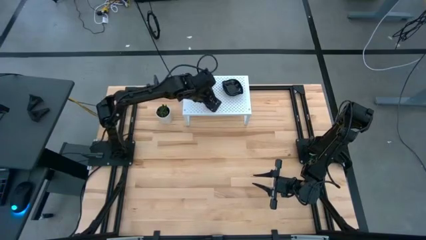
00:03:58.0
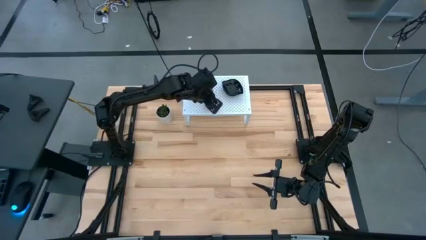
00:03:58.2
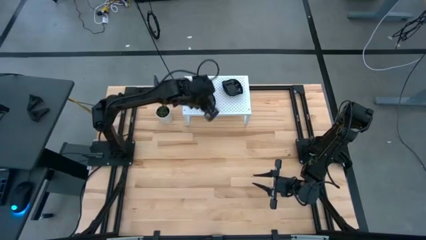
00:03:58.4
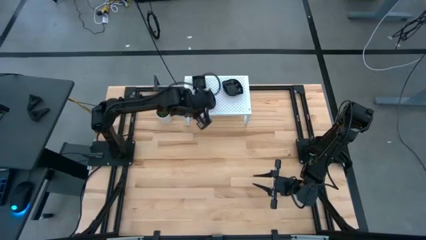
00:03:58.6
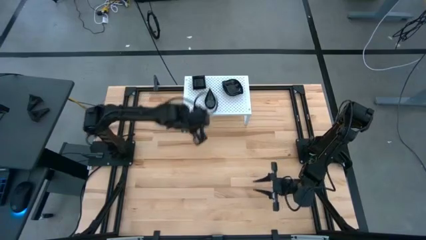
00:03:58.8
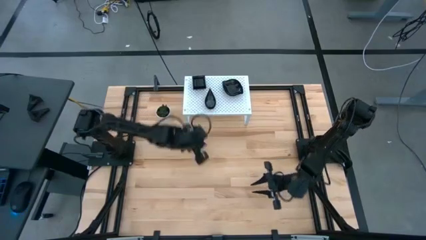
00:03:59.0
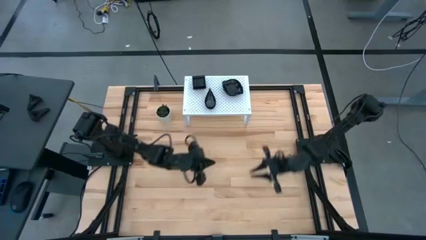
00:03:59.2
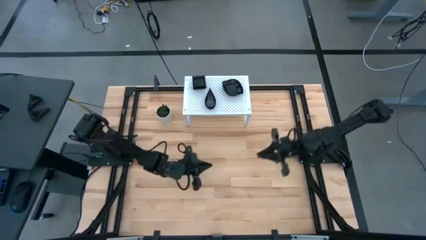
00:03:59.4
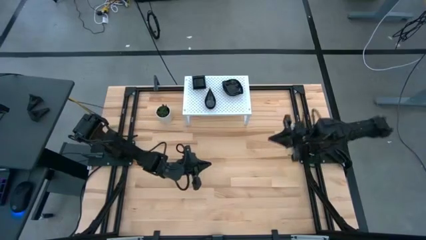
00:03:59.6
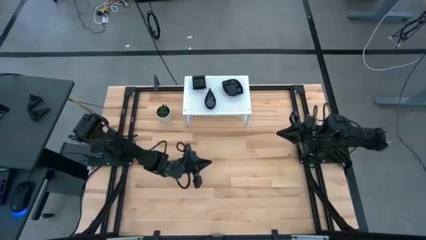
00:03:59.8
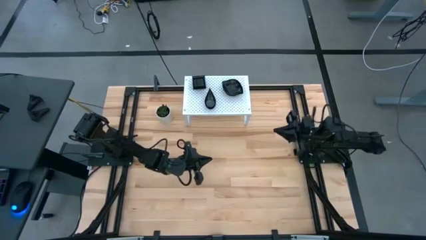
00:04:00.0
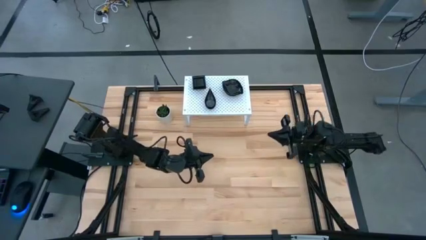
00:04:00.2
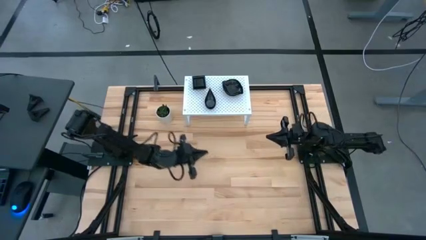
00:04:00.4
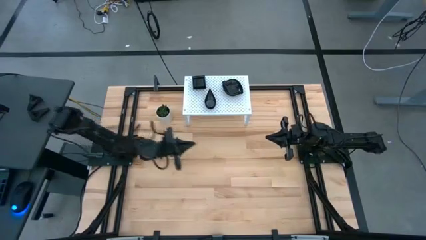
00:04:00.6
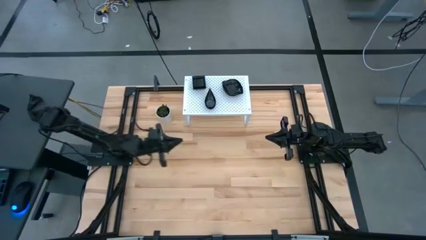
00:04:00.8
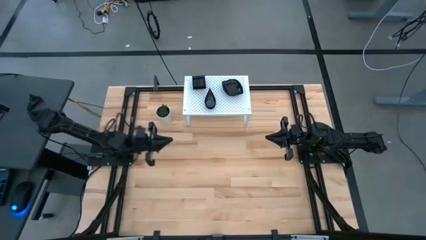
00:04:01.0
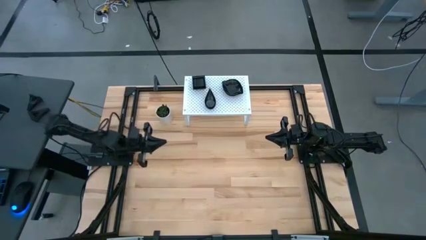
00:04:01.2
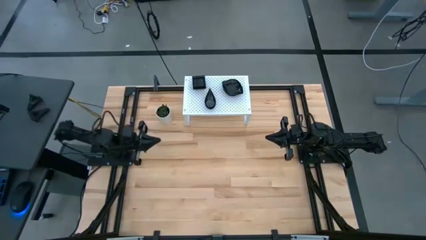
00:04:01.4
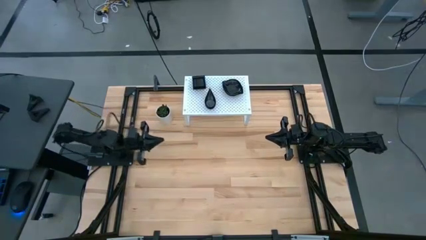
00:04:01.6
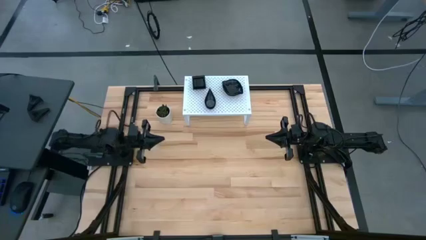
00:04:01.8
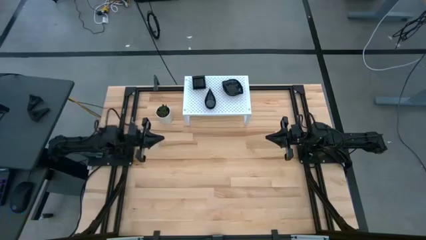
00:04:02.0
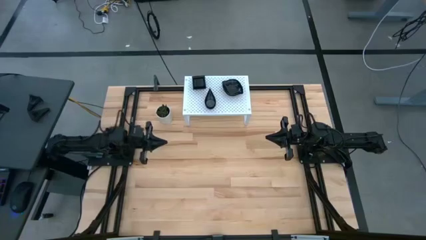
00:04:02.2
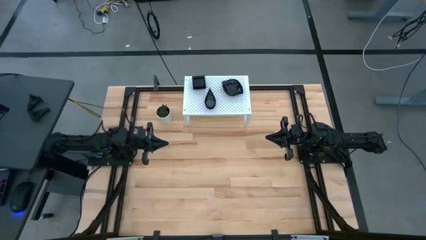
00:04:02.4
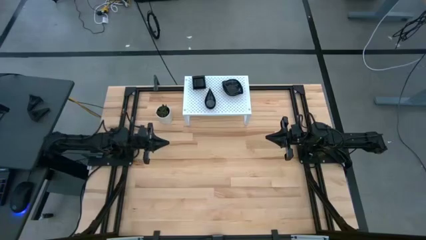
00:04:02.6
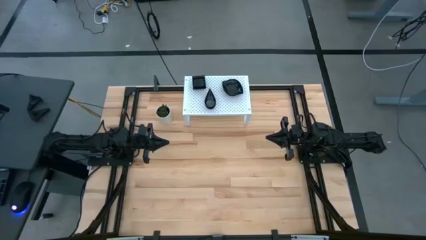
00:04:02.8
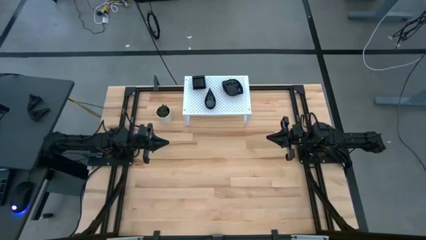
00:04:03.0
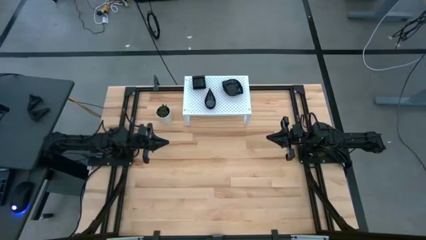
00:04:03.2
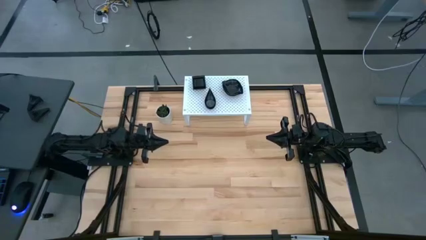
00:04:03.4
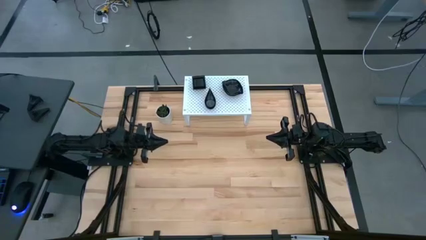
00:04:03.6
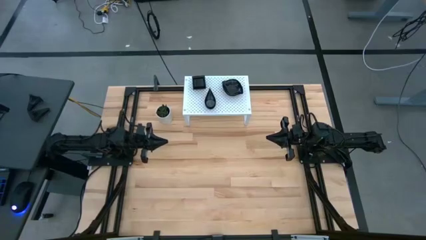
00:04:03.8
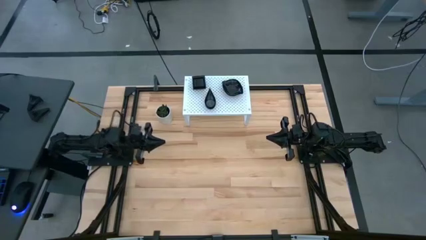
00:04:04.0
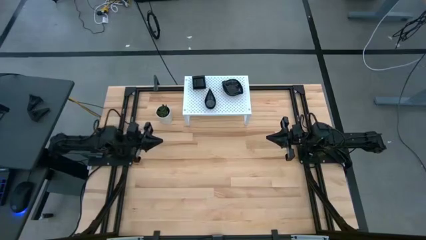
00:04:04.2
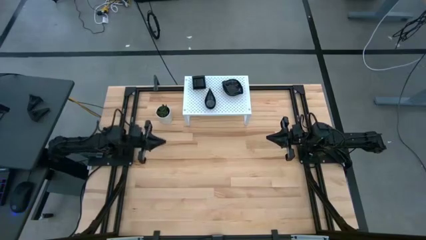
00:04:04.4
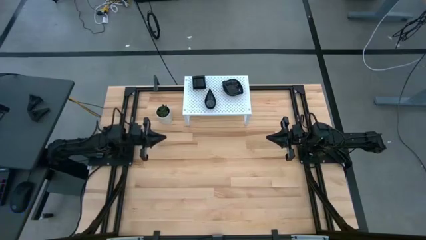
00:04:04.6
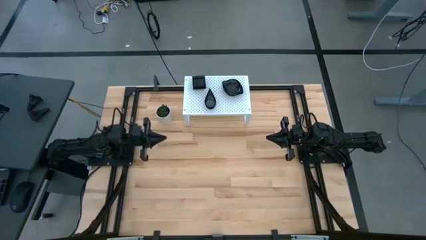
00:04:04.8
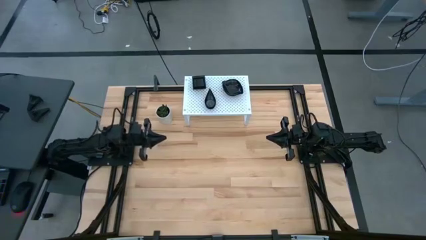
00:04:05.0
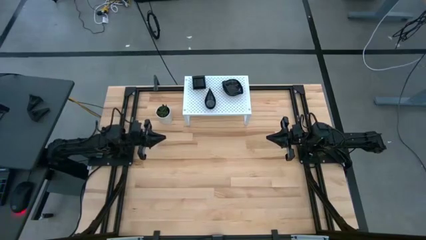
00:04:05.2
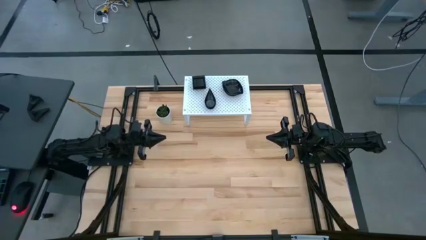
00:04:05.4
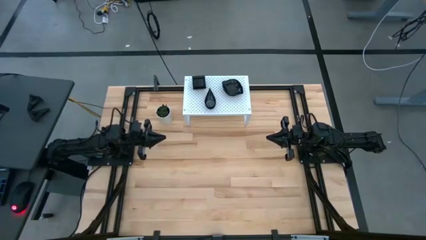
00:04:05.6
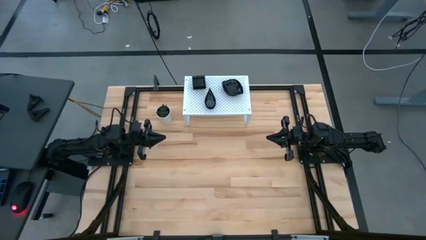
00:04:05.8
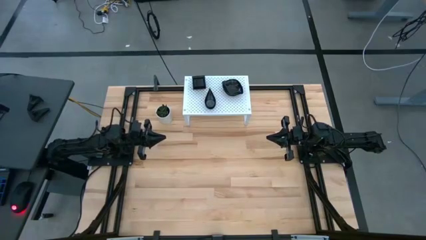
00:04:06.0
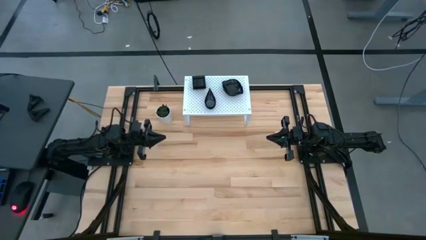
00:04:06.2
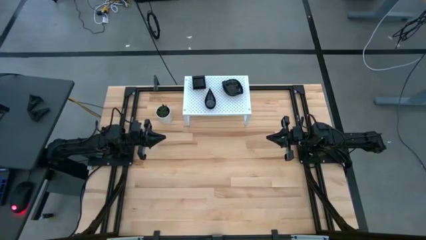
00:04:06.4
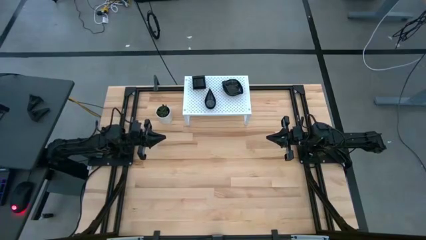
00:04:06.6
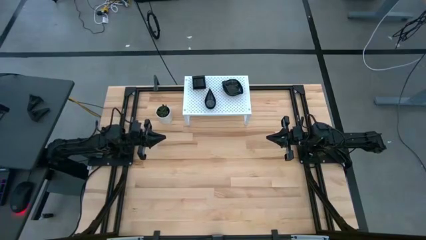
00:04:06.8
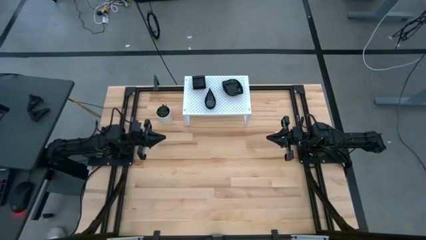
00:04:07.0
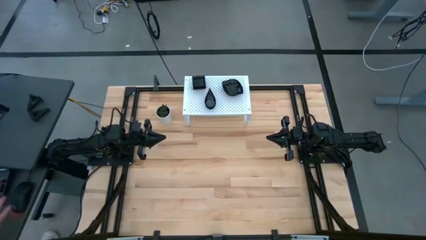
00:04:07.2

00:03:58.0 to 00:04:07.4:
Task: Pick & Place Mini shaped plates
Return to Home Position

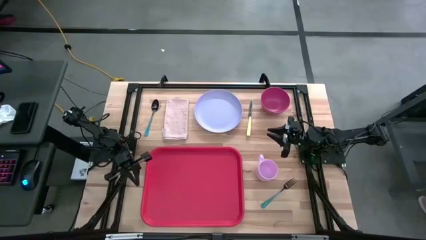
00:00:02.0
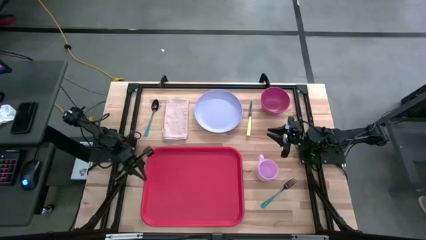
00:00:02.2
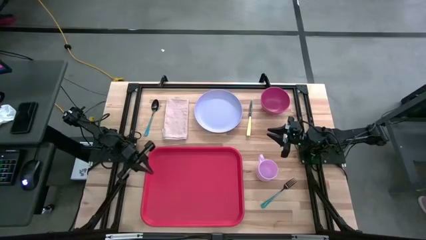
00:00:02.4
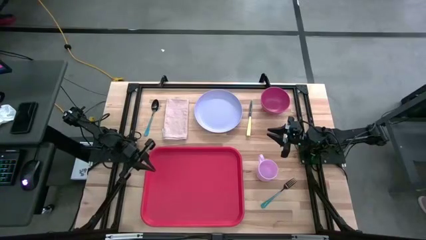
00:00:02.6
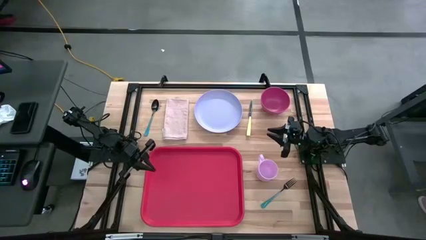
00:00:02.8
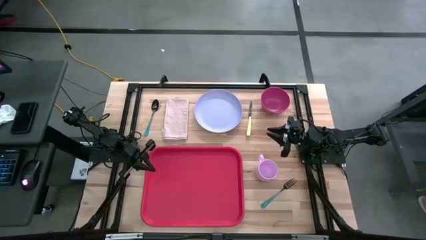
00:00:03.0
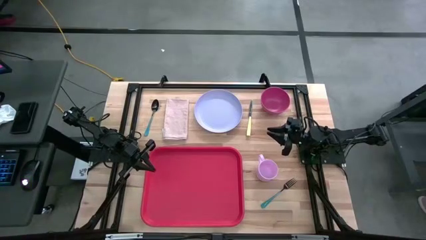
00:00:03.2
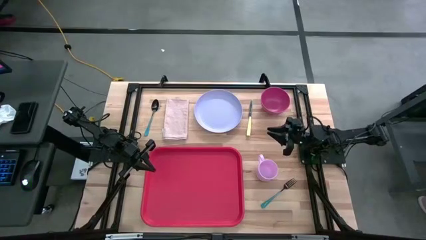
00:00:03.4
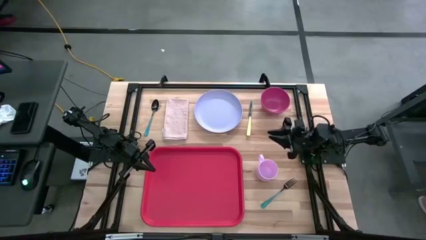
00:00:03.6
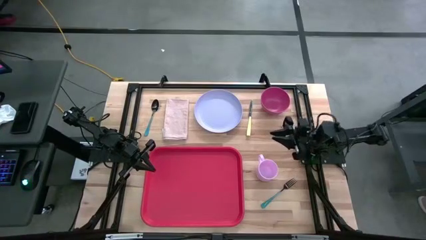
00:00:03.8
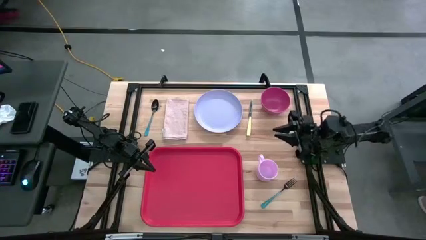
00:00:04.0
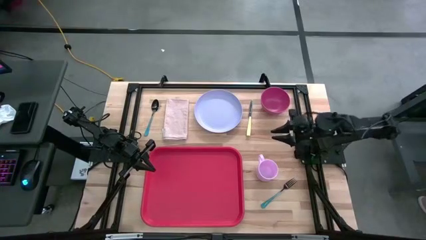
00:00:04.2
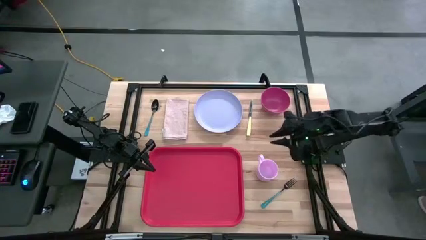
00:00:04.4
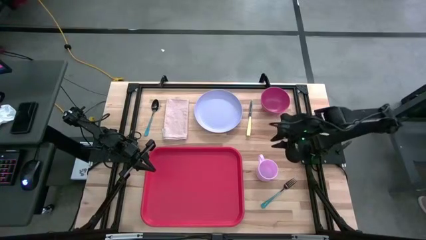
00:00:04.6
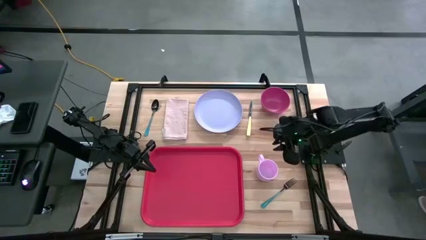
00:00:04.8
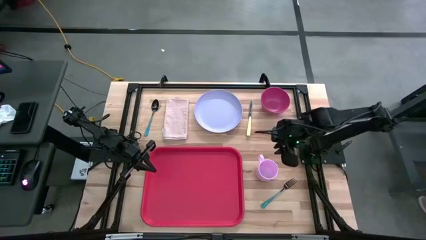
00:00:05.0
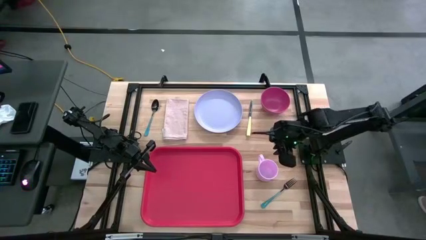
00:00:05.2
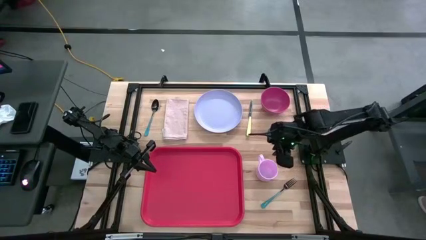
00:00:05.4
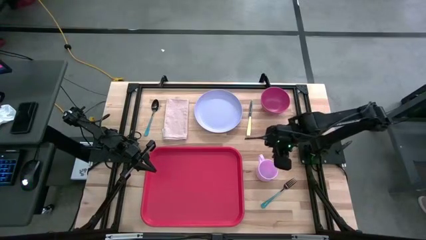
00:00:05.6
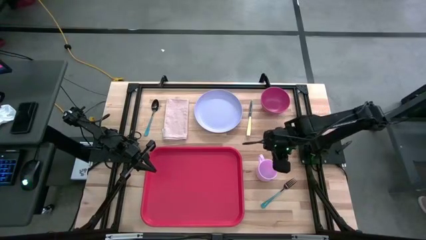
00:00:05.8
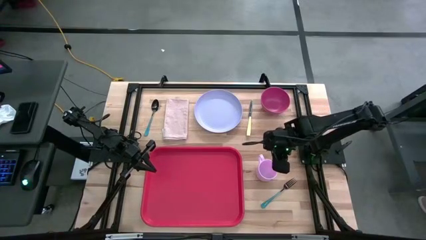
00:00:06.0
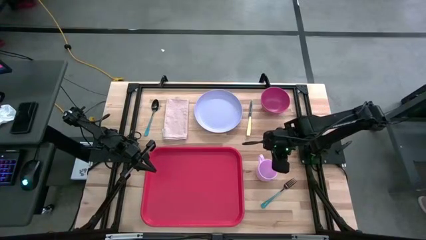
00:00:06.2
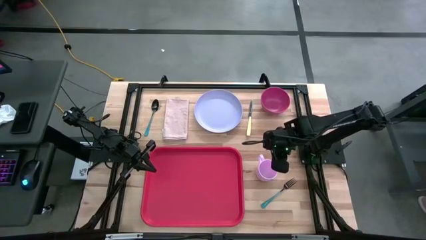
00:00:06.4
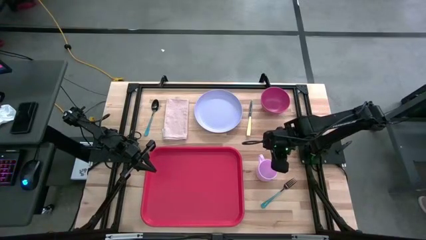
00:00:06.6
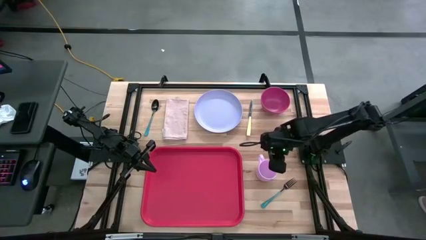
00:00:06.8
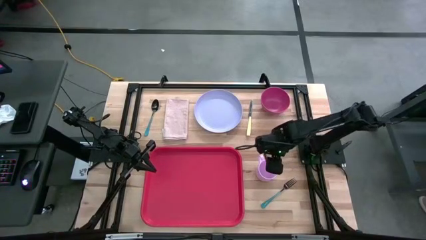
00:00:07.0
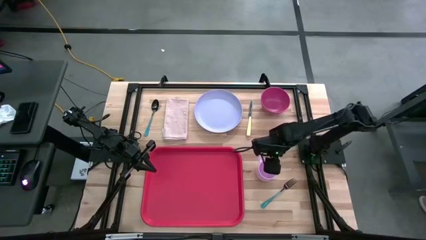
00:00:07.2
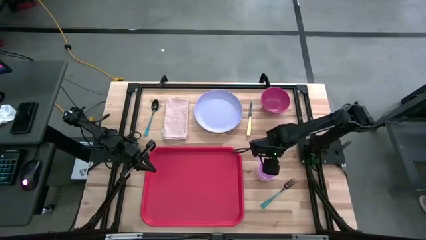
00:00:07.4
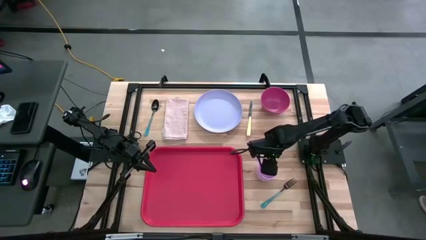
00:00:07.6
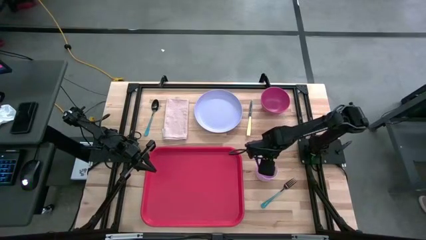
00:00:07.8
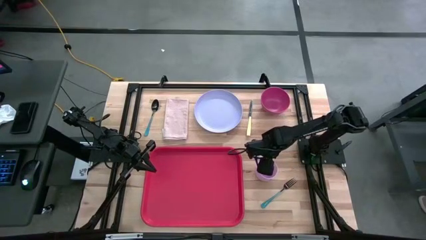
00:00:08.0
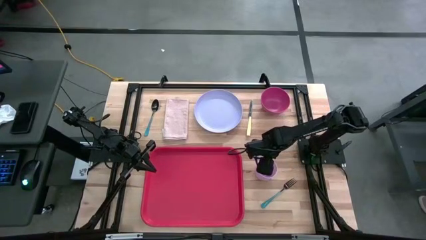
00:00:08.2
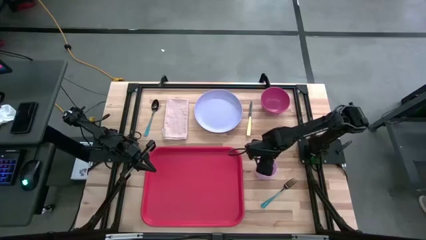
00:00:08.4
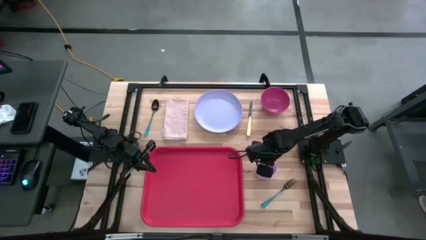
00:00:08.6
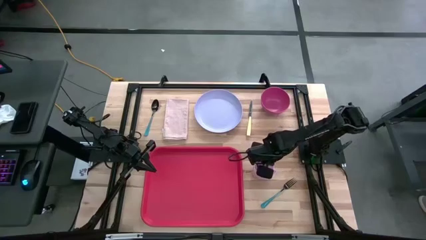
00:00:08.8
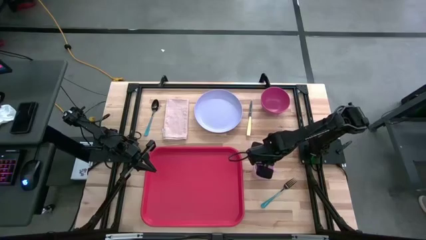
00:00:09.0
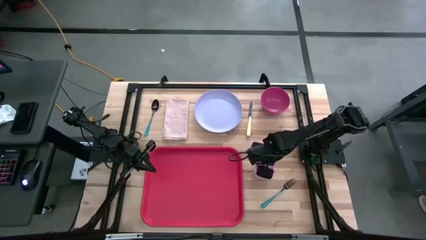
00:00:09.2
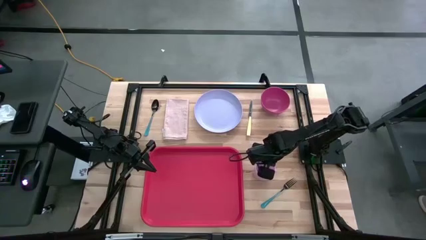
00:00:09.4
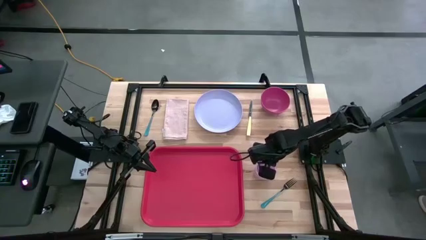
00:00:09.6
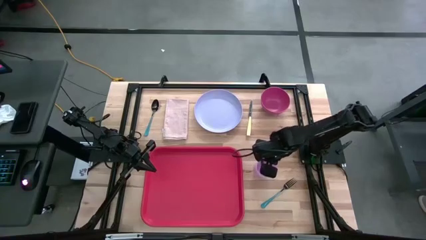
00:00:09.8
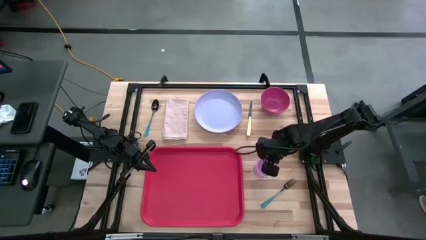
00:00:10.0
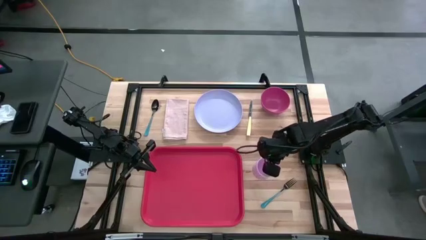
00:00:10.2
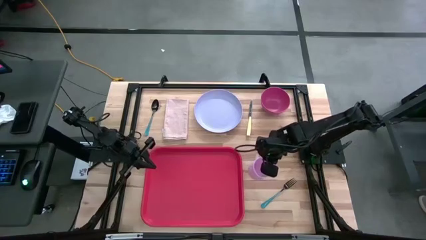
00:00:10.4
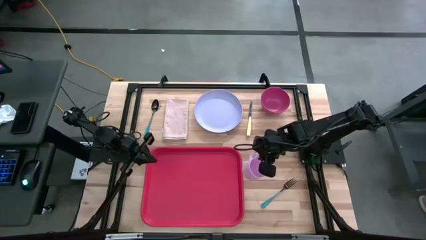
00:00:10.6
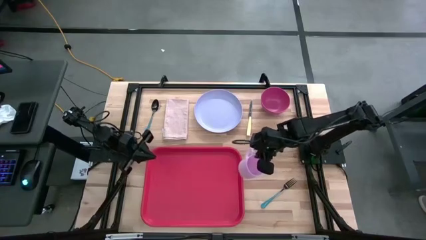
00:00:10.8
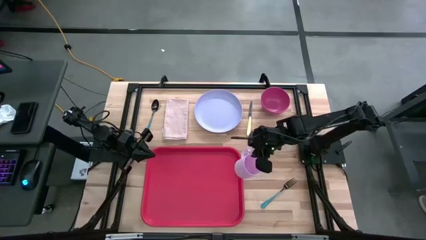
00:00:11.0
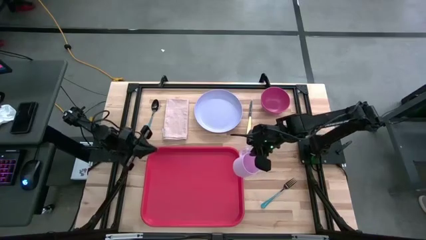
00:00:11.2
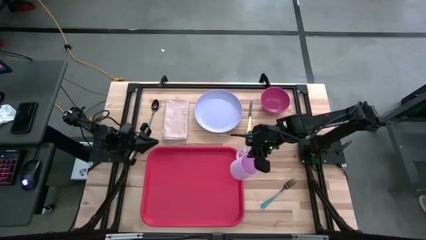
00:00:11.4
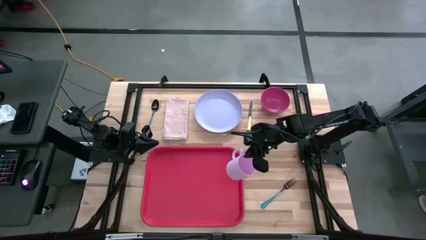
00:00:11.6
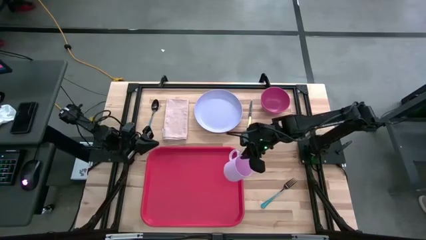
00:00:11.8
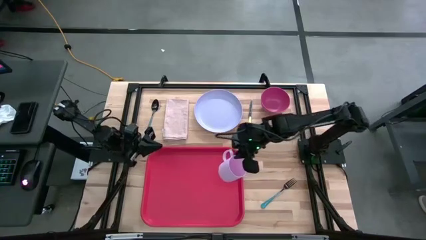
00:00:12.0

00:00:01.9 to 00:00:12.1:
Task: Set up tray
Put the pink mug on the top left of the orange serving tray
